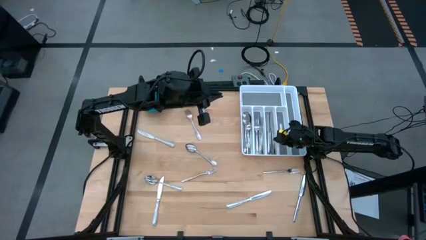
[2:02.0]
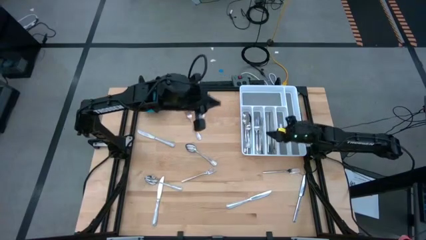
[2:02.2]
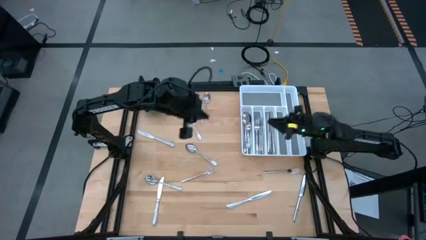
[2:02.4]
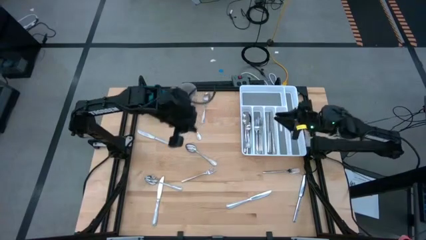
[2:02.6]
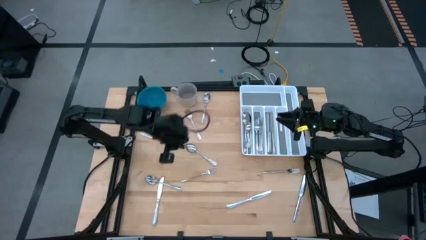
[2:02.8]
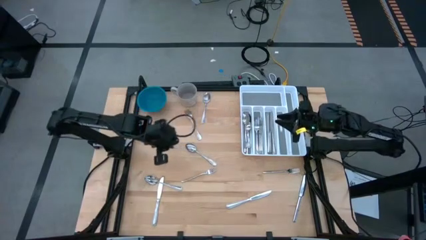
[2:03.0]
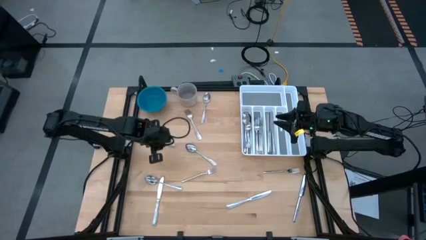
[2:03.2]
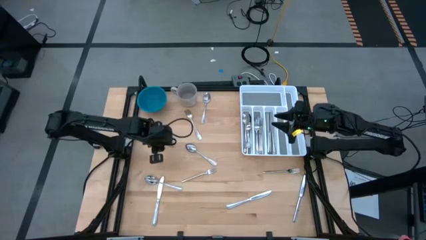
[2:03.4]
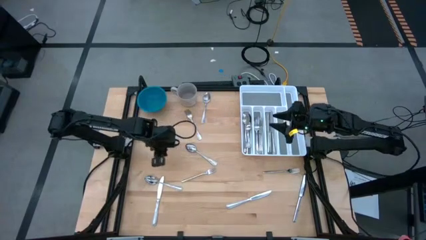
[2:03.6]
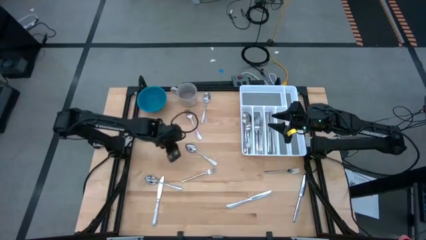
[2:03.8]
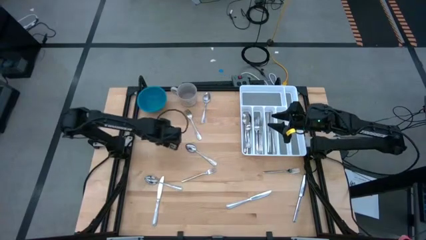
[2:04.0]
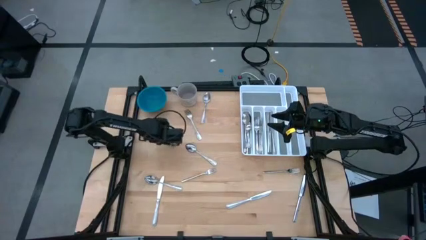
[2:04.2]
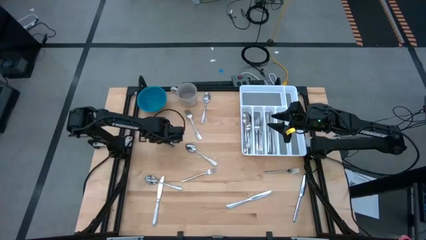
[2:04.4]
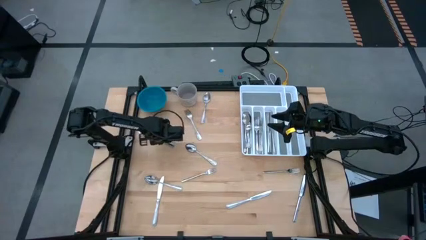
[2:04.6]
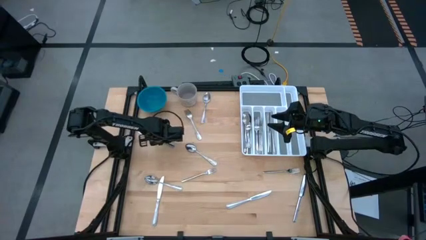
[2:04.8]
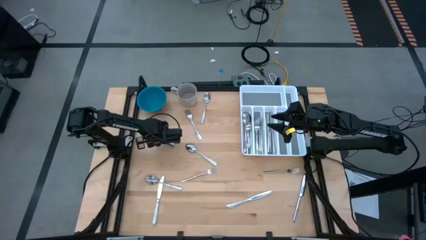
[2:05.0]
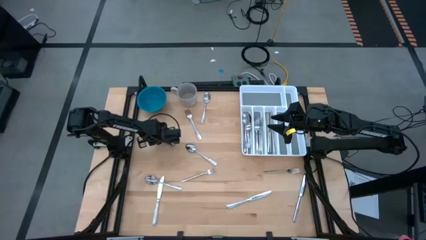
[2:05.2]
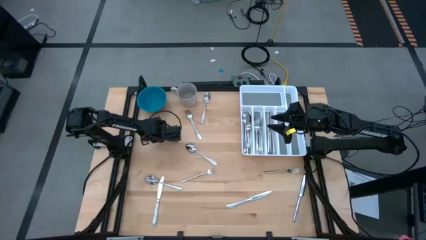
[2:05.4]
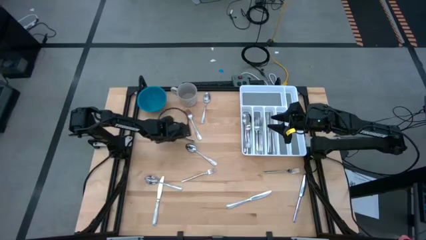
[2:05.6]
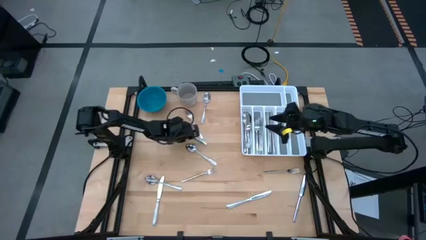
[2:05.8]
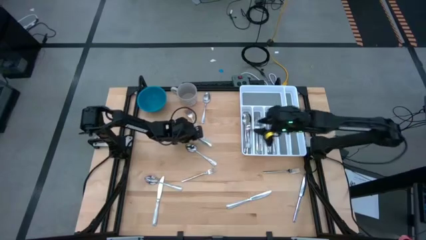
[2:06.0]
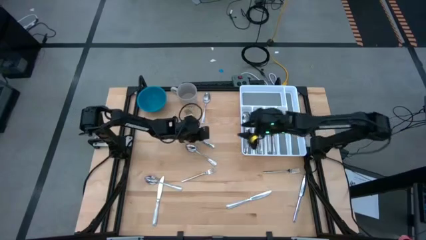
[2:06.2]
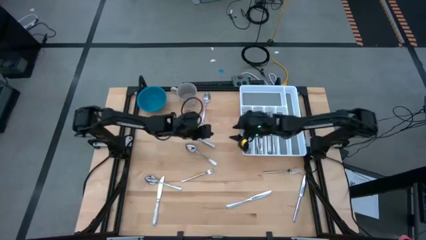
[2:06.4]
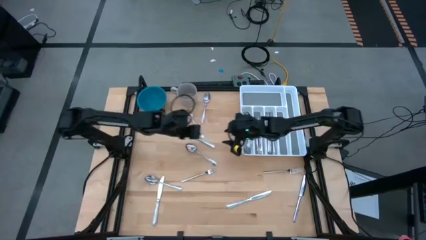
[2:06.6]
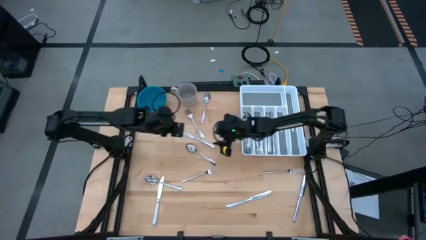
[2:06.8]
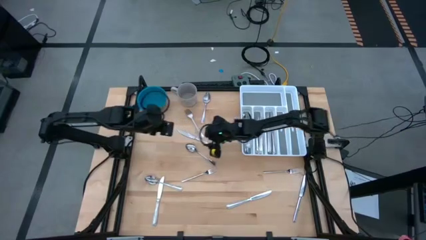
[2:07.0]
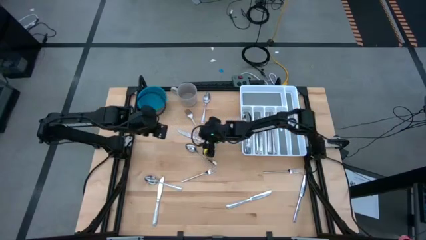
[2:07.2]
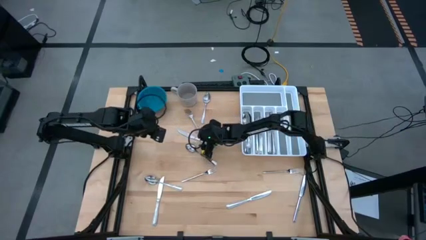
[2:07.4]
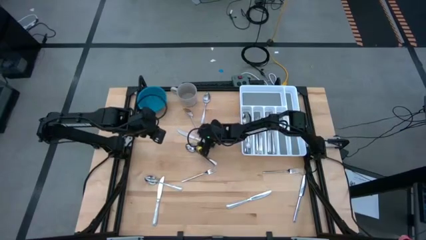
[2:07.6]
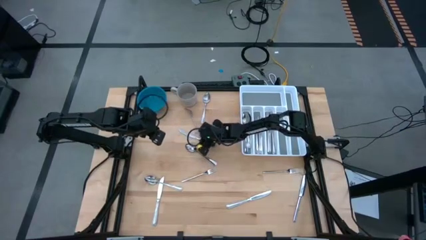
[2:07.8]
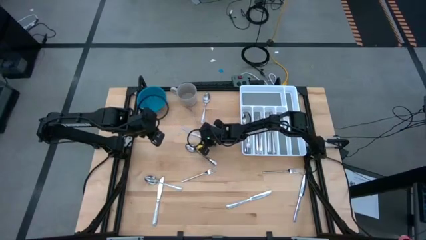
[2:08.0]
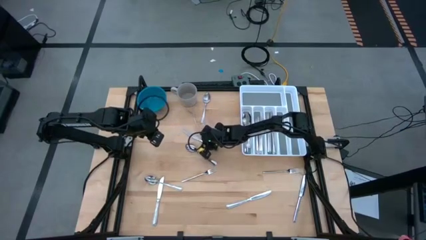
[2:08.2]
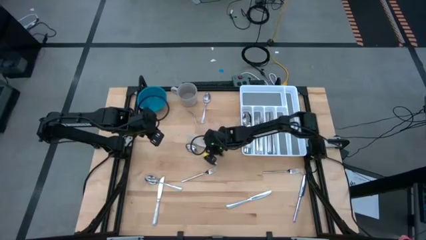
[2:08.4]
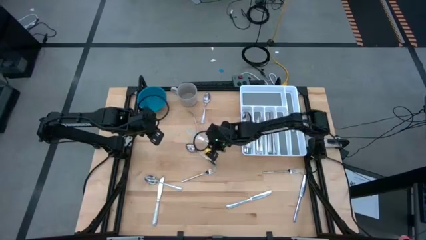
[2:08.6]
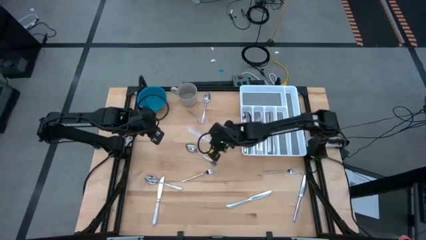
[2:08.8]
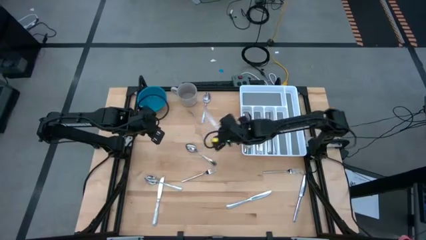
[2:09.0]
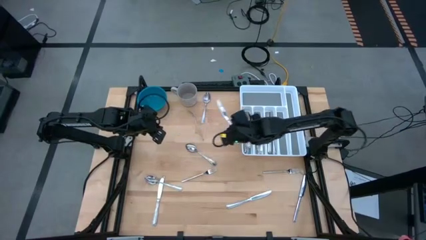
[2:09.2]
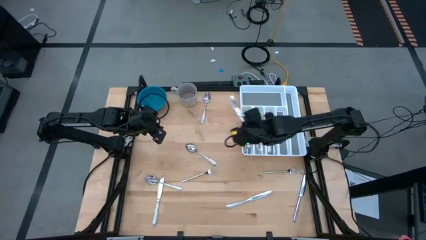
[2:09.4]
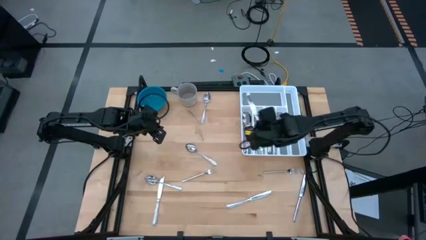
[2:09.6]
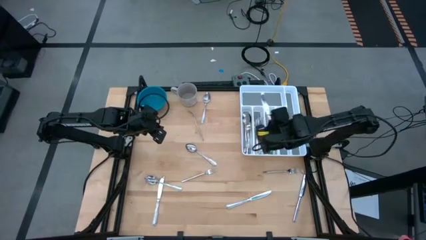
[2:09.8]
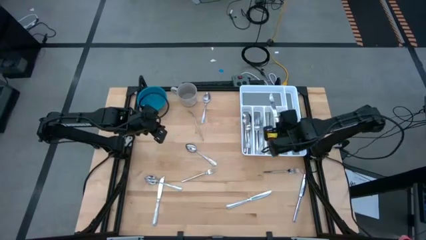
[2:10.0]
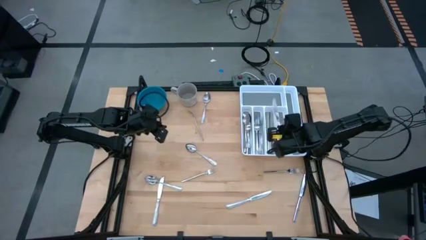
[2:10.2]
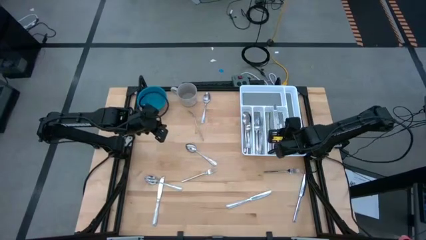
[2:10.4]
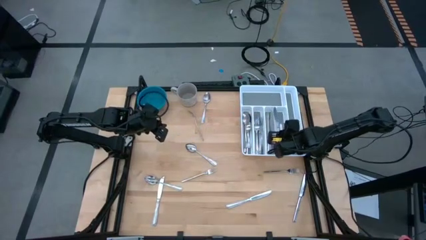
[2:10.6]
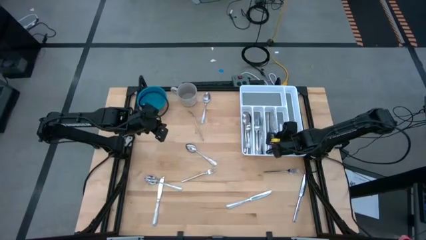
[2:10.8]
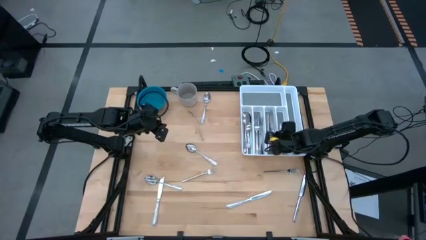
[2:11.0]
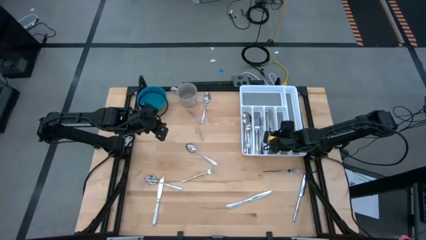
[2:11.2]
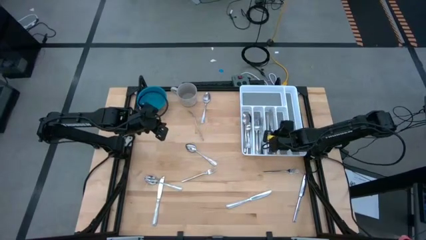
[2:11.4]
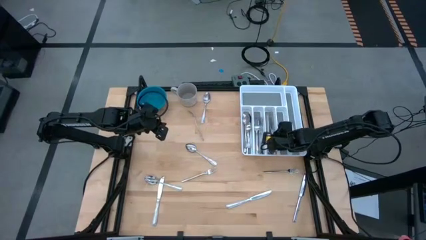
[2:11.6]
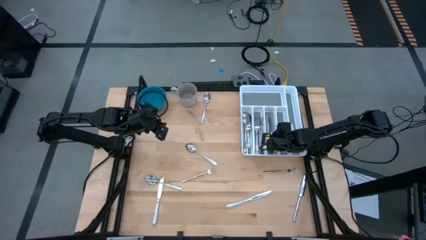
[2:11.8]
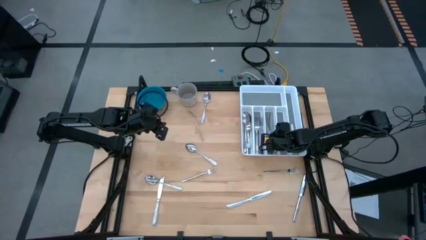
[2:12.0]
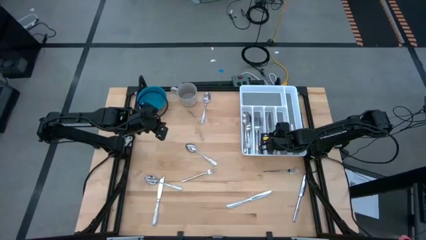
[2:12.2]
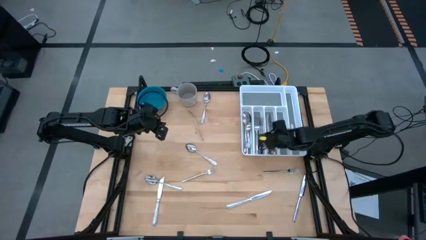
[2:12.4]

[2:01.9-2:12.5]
Task: Sort silverware
Put the table knife in the silverware tray

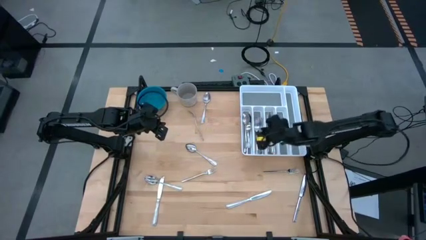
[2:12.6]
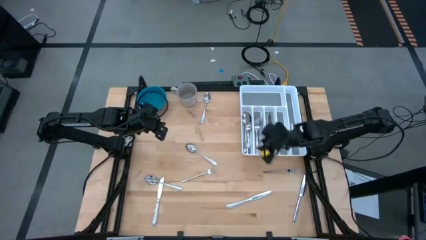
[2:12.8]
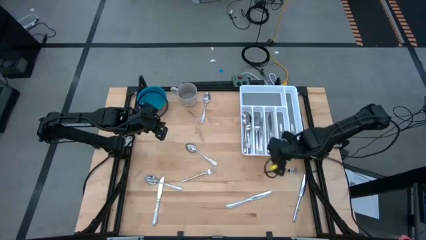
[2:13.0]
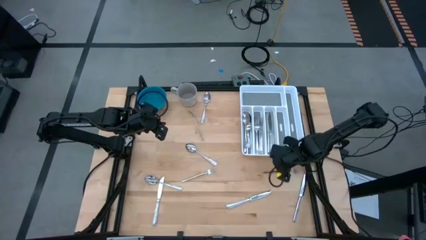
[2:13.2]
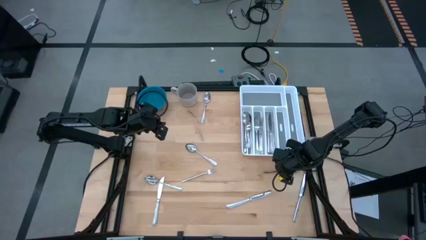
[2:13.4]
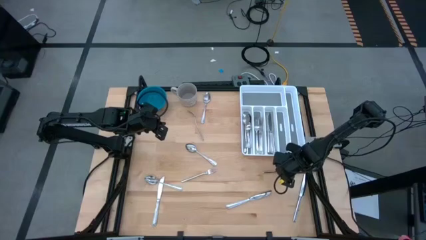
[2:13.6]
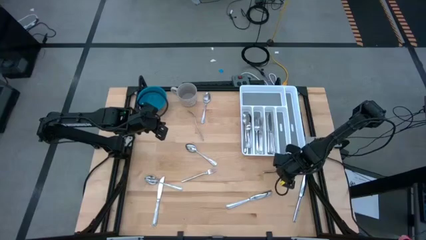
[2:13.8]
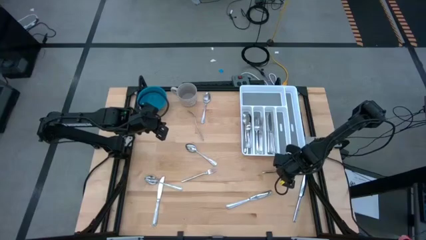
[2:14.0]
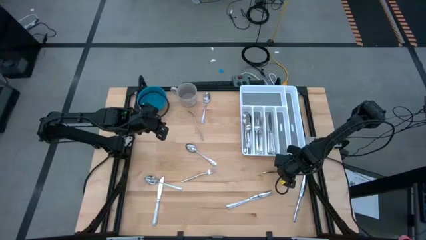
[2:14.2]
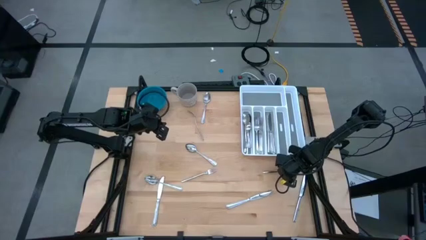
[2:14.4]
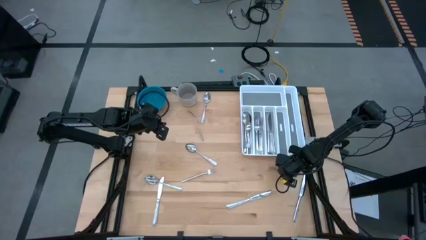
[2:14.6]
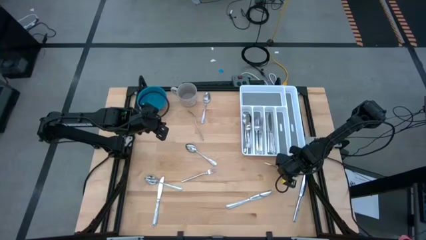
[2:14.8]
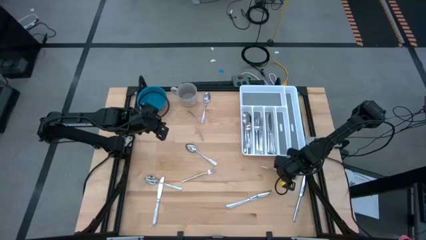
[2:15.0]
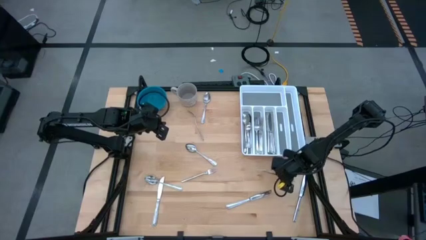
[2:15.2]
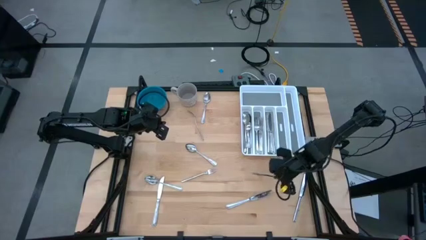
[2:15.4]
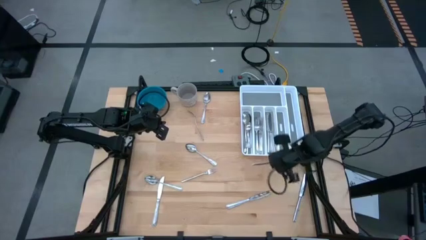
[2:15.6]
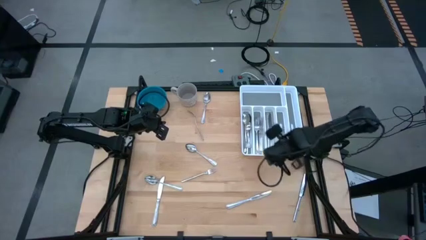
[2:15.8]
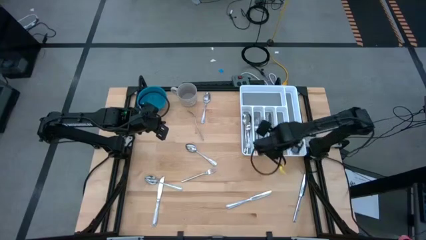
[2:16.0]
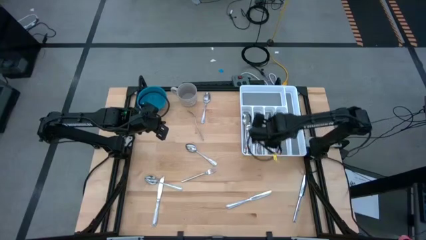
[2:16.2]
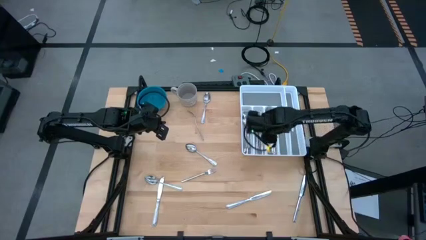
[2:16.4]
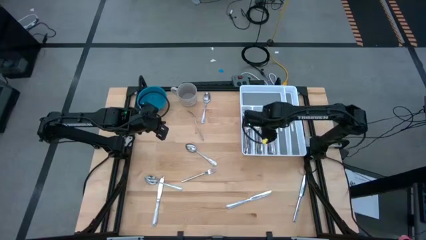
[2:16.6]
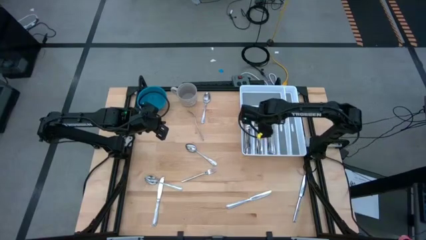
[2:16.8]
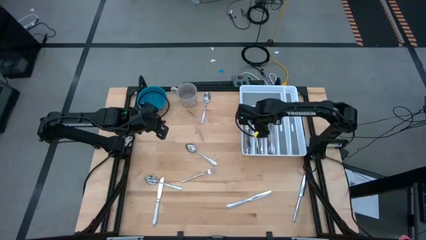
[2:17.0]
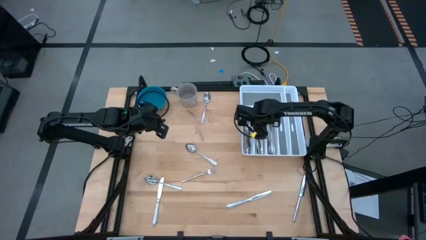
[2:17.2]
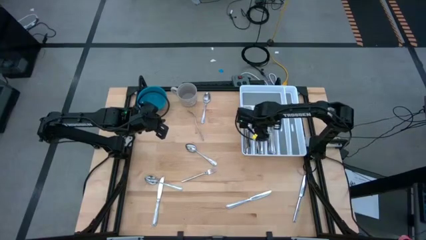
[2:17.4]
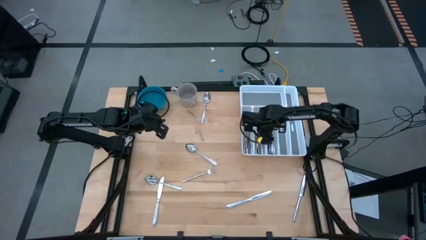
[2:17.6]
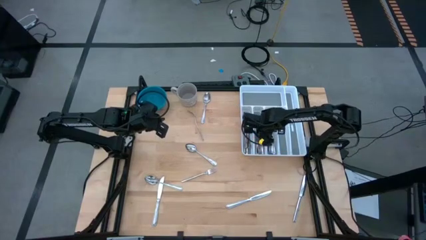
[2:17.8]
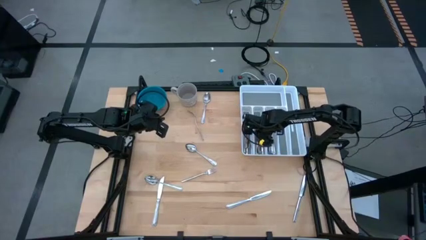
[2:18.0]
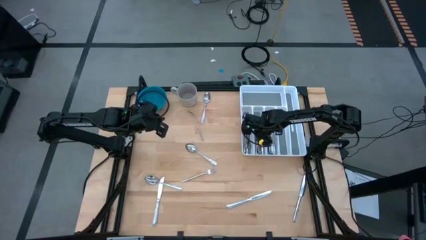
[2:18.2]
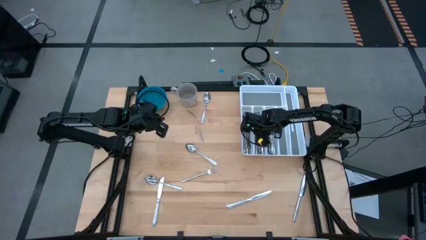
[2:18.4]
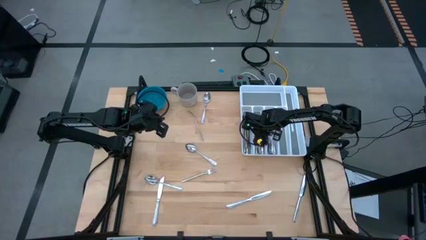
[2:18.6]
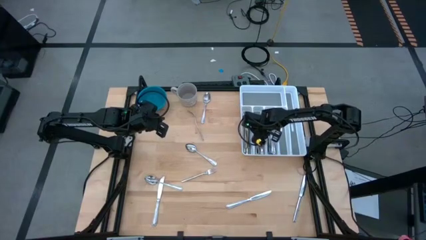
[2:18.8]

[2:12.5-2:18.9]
Put the fork in the silverware tray
